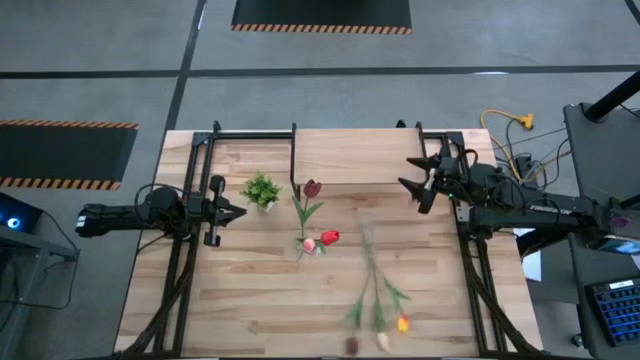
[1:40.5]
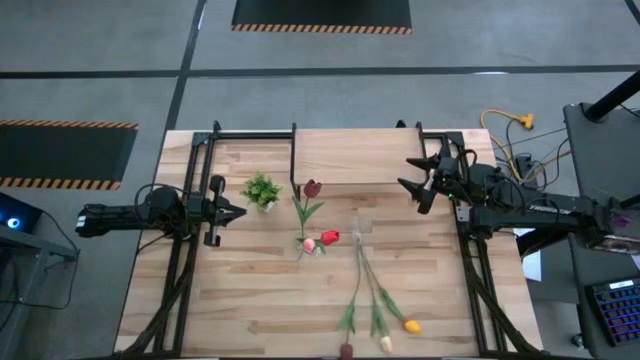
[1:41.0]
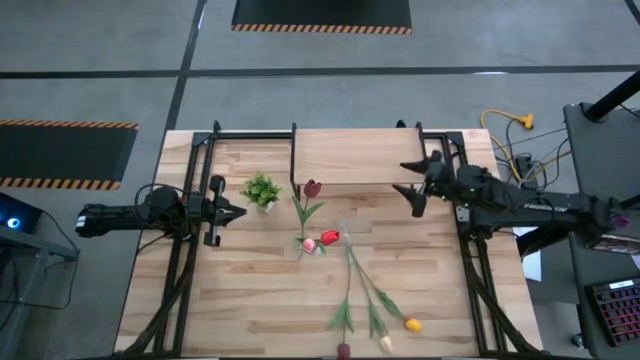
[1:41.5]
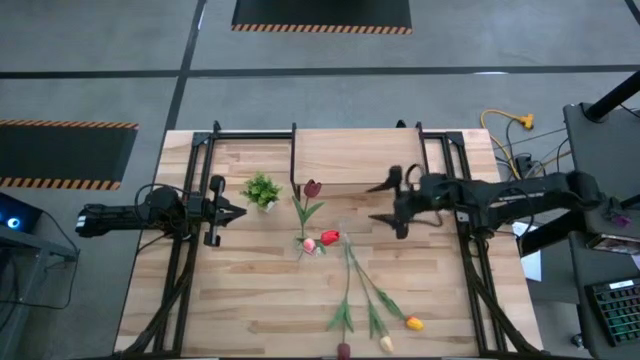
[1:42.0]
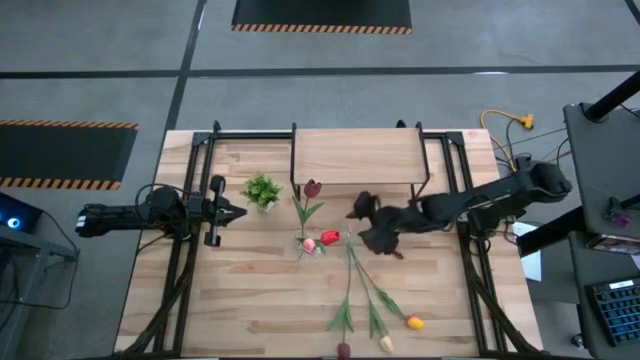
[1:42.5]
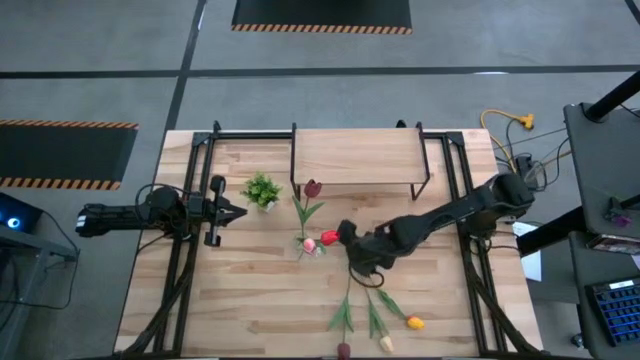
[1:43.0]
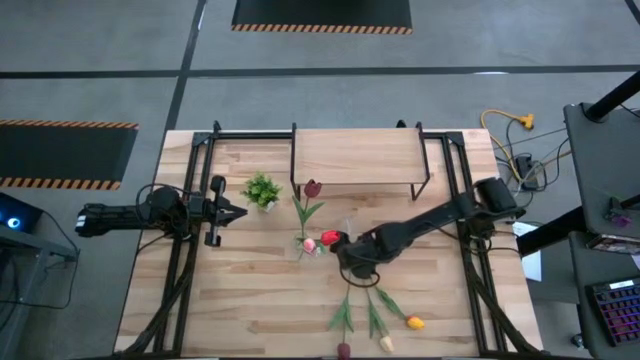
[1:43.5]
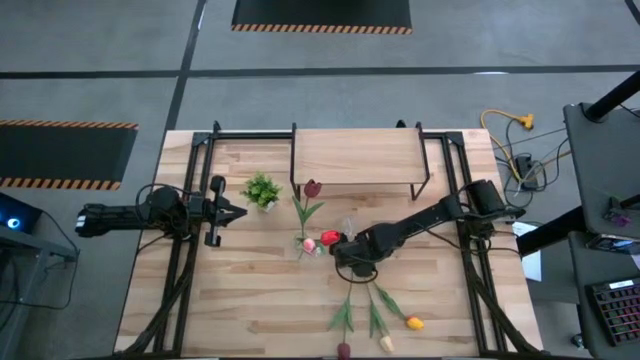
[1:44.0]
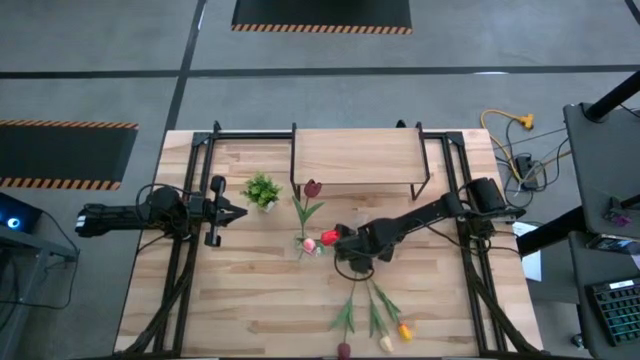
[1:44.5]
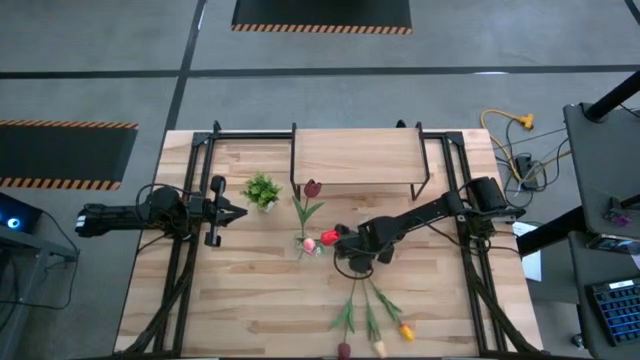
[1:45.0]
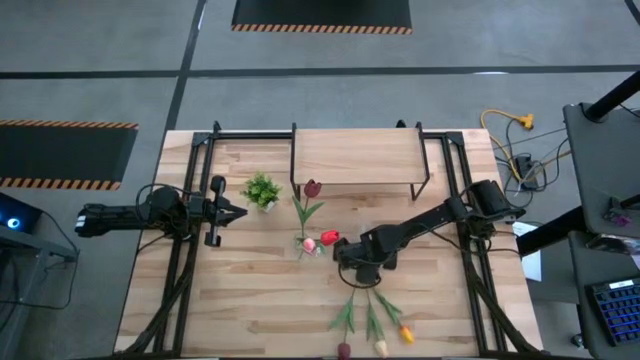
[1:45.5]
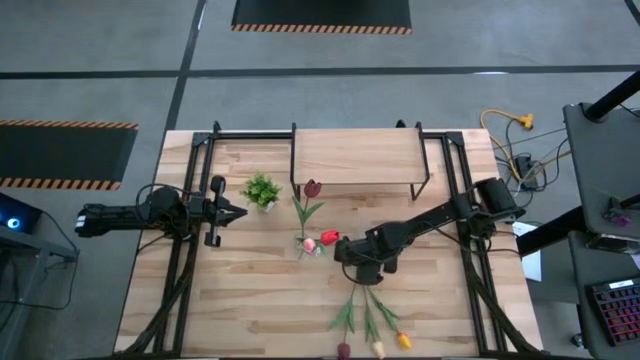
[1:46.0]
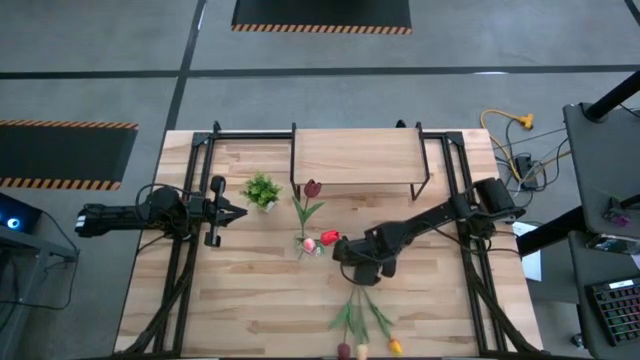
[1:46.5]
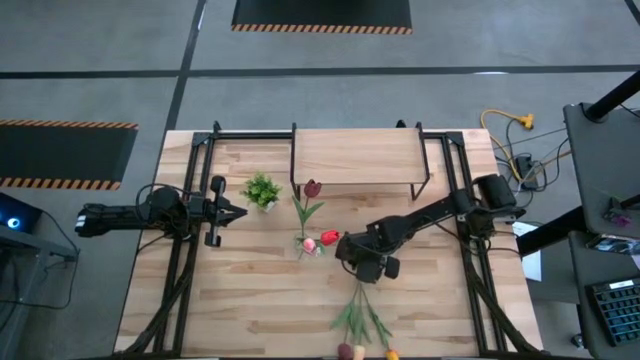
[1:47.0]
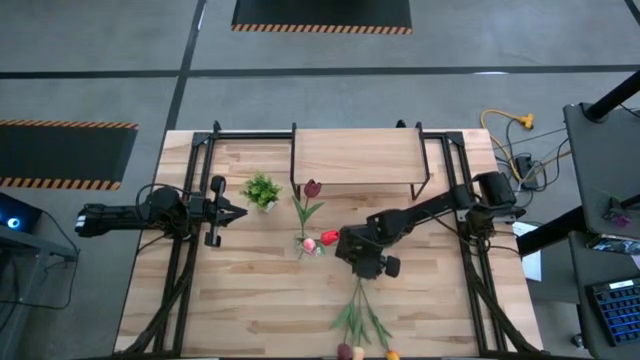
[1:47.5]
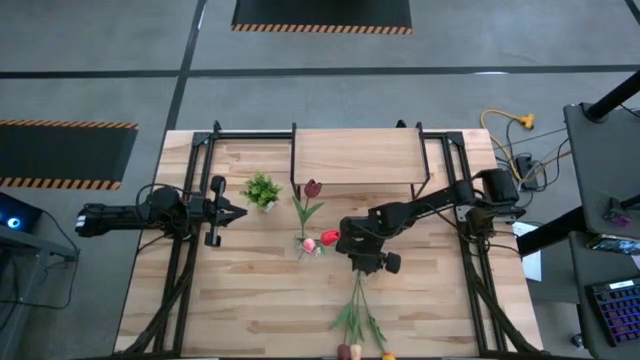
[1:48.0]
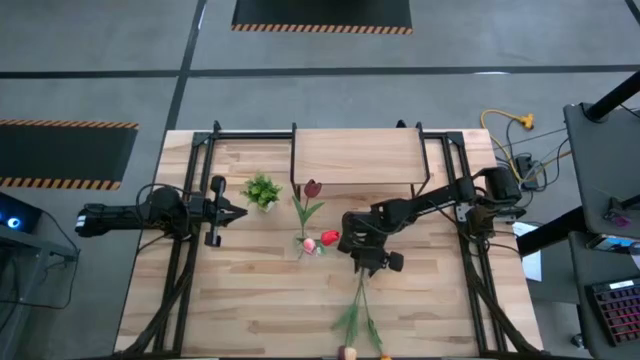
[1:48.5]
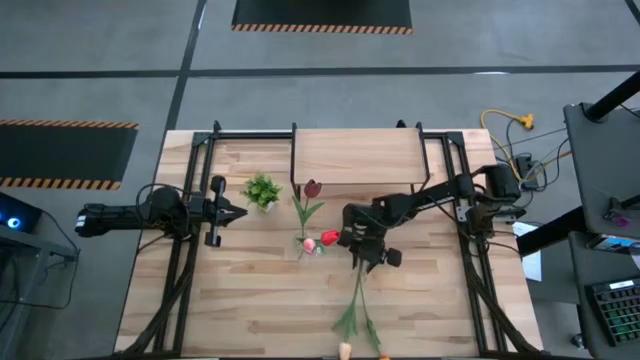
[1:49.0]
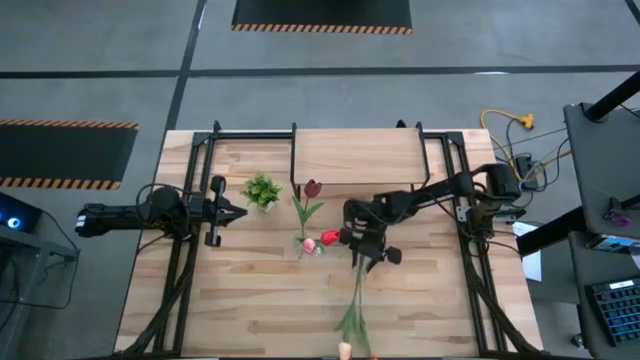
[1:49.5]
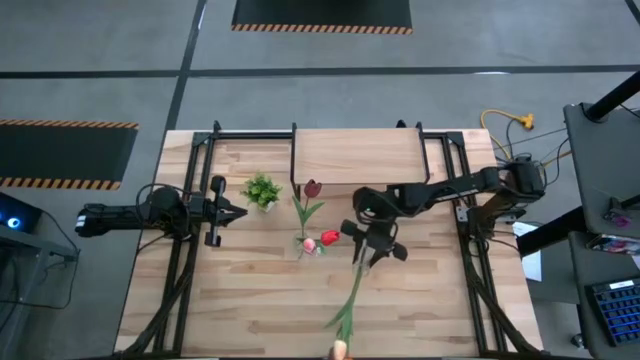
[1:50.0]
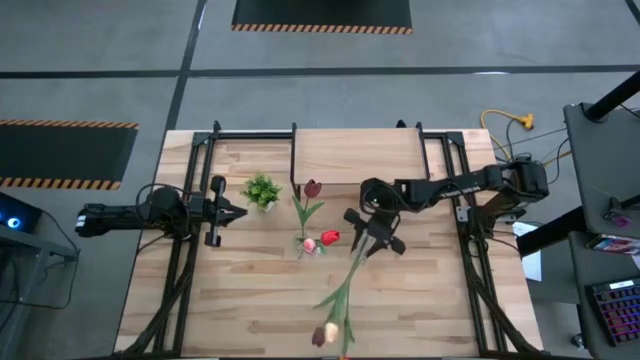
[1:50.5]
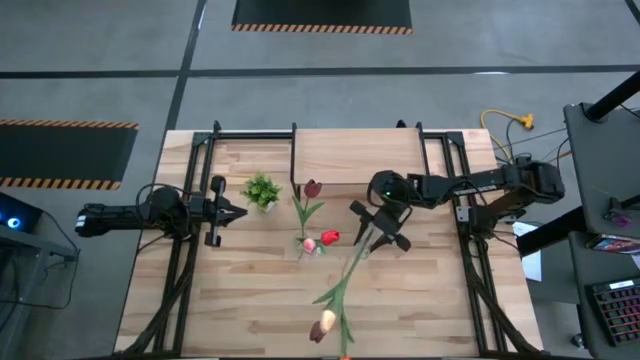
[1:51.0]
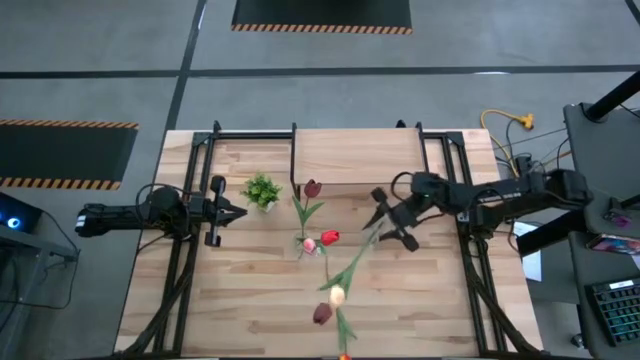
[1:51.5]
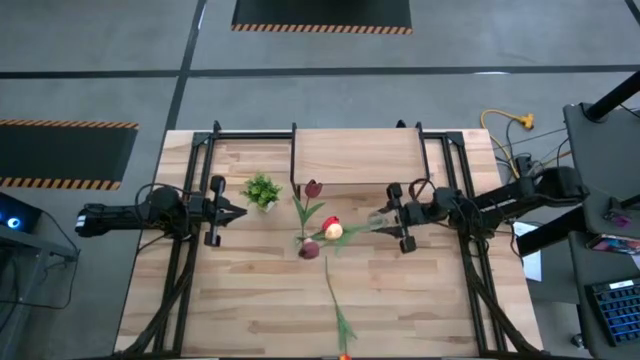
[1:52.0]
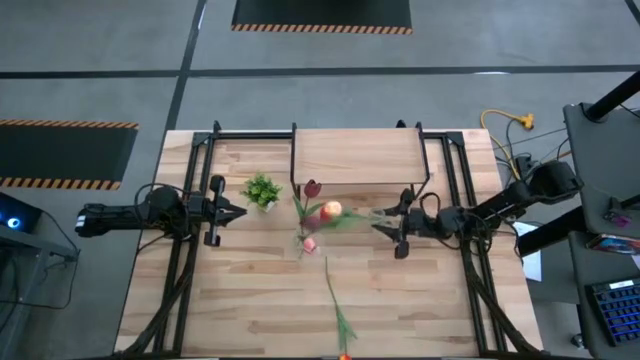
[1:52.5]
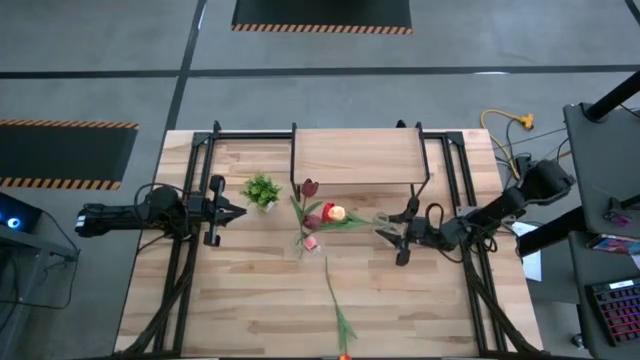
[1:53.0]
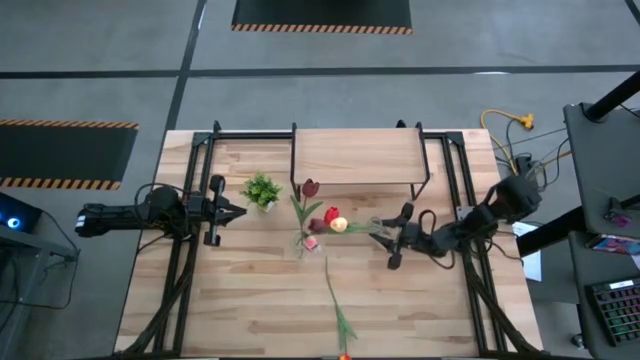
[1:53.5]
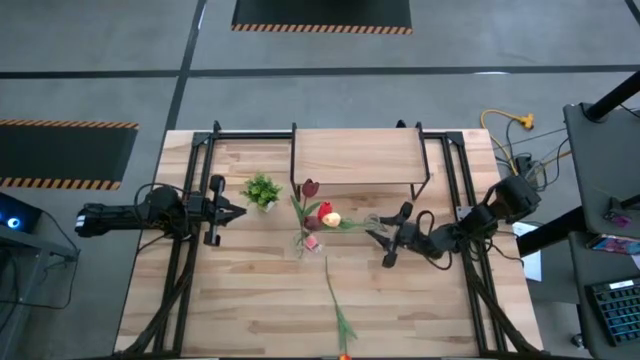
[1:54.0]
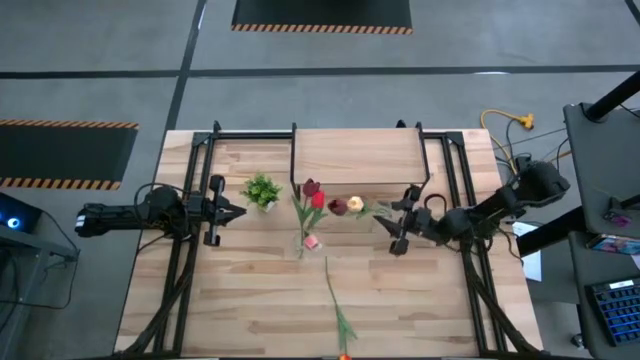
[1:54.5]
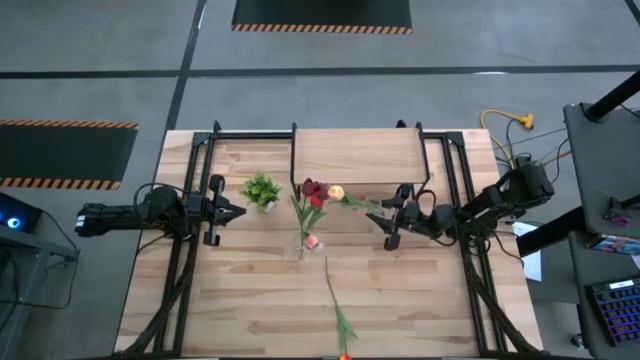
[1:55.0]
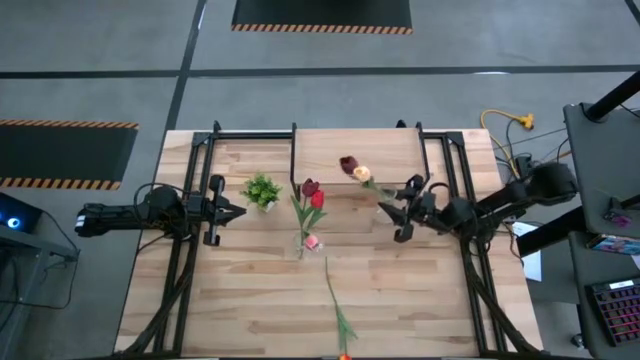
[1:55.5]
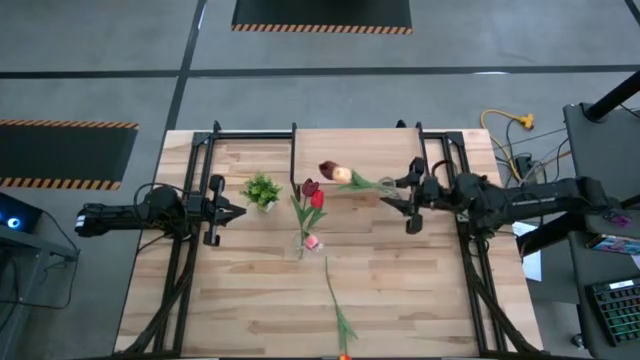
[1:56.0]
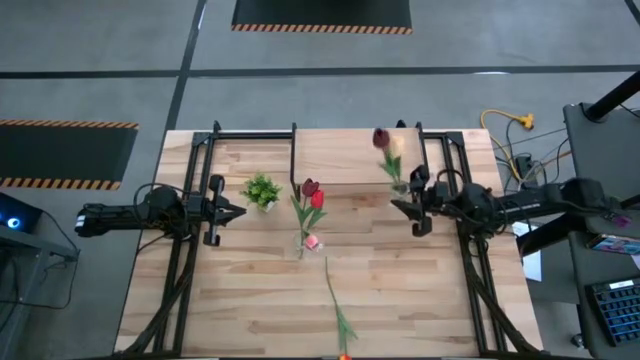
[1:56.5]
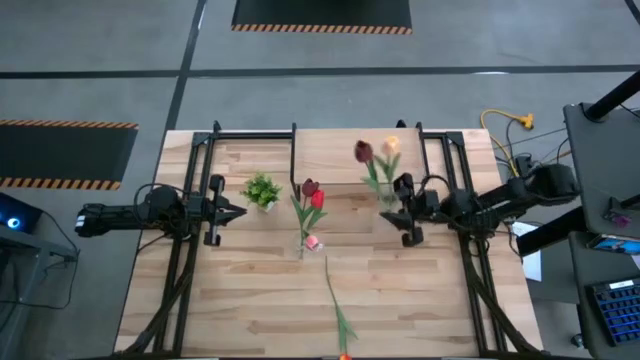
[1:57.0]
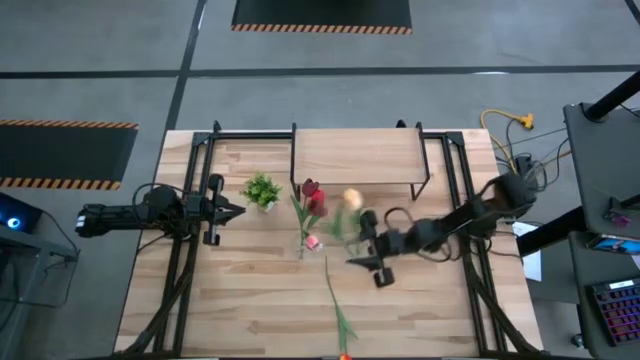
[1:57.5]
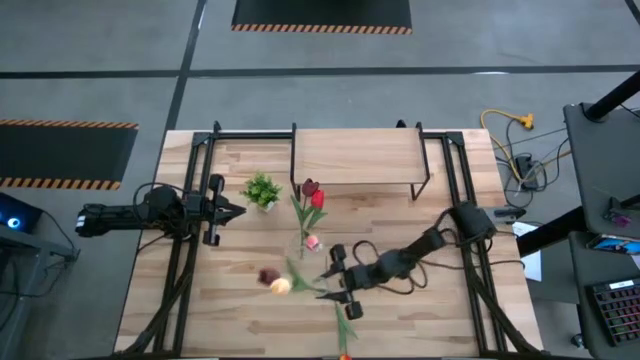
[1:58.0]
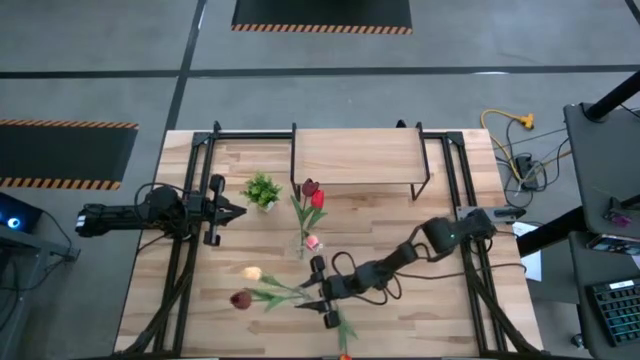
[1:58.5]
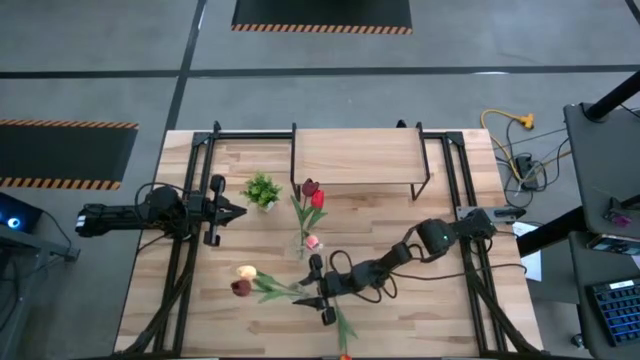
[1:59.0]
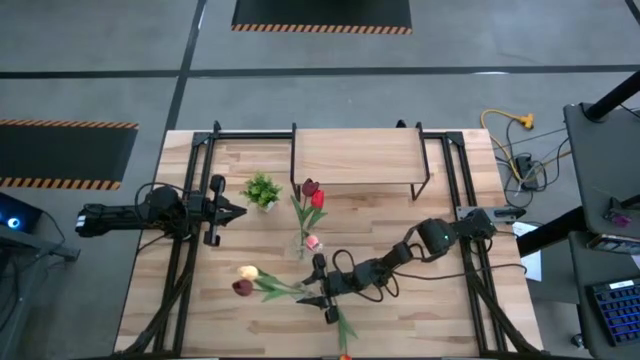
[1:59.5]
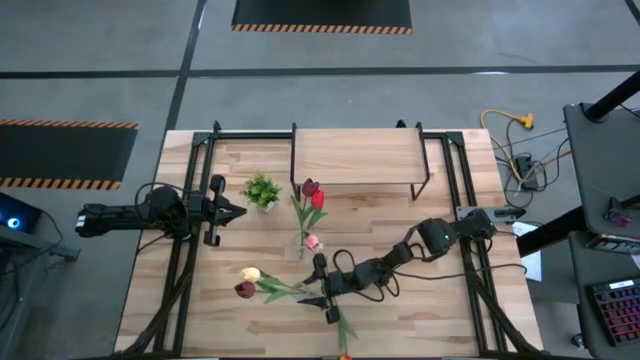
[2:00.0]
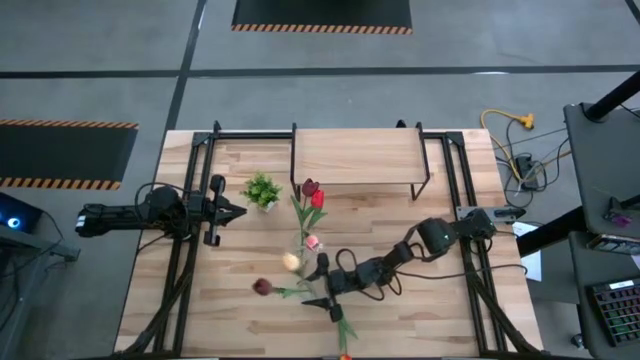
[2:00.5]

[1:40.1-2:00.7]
Task: Pick and place flowers into a vace then onto a shelf
Adjust the right transparent vase
